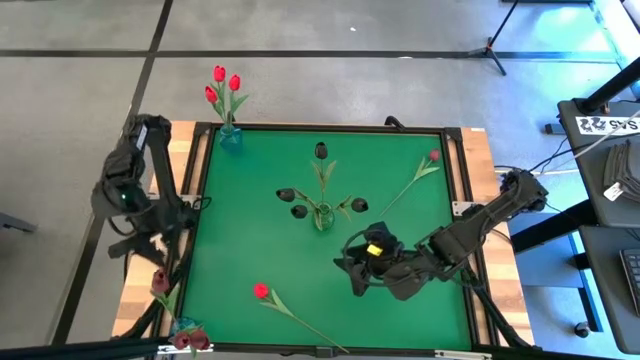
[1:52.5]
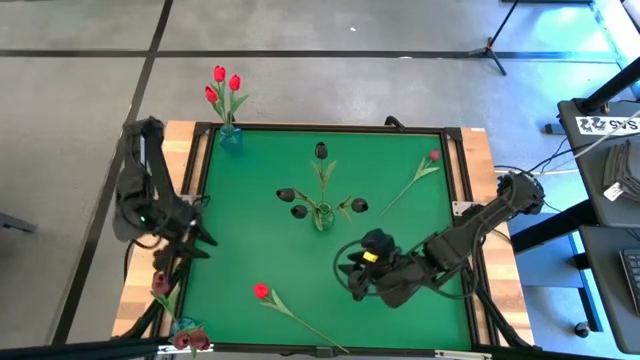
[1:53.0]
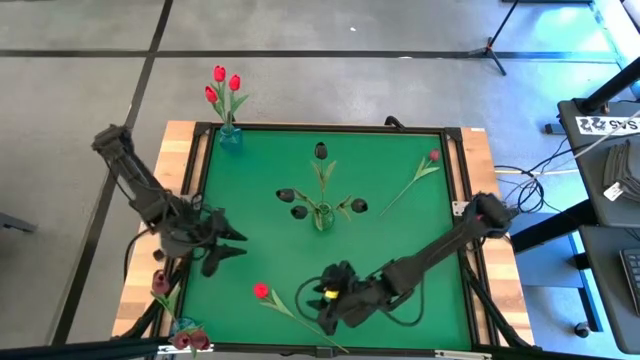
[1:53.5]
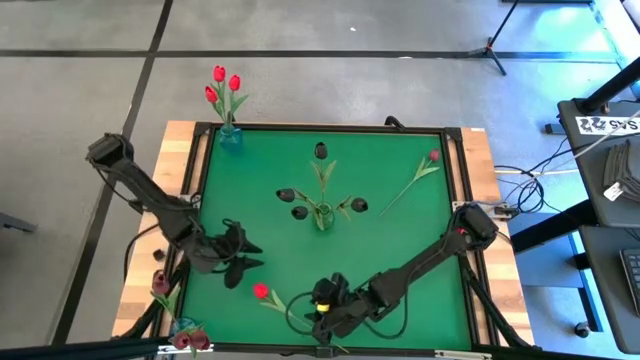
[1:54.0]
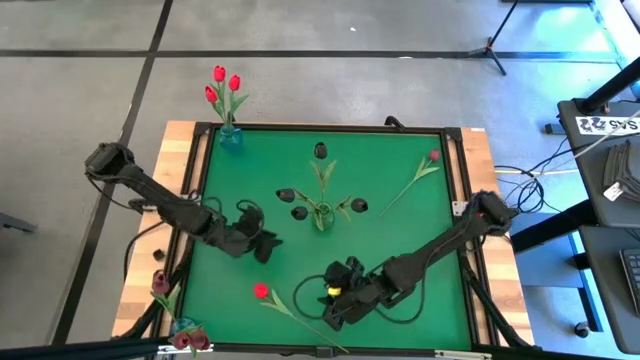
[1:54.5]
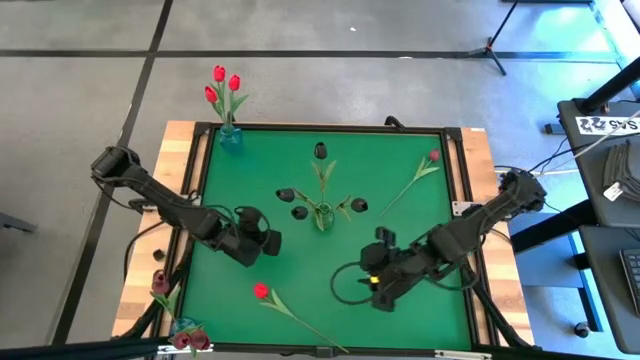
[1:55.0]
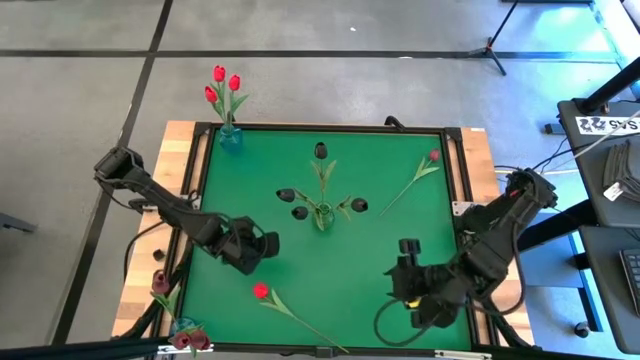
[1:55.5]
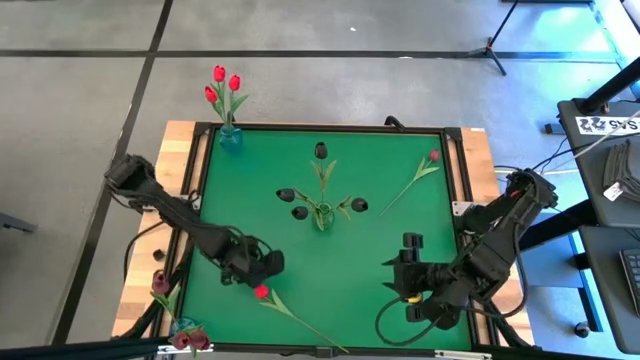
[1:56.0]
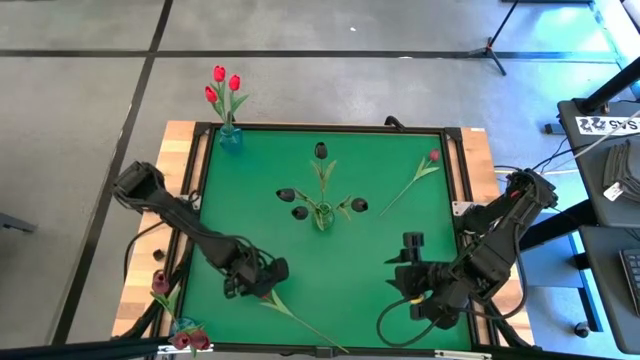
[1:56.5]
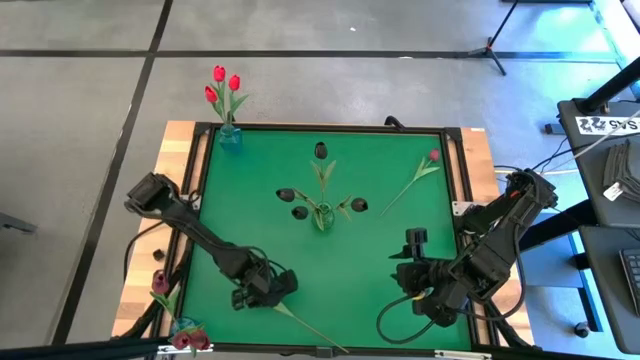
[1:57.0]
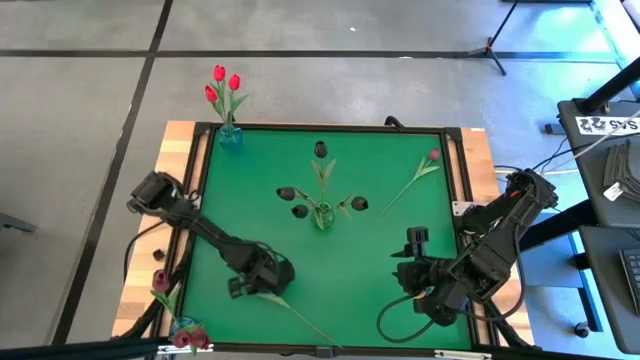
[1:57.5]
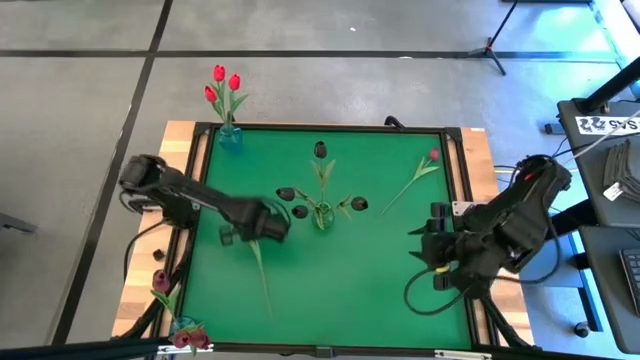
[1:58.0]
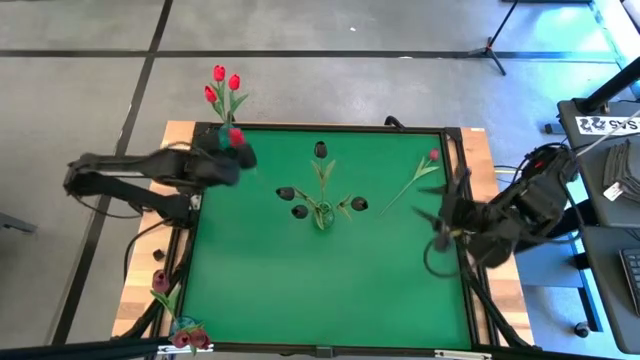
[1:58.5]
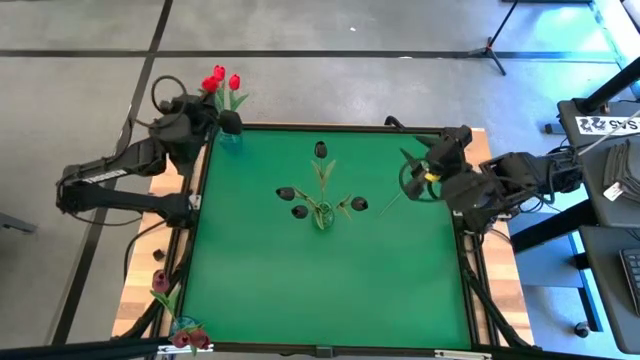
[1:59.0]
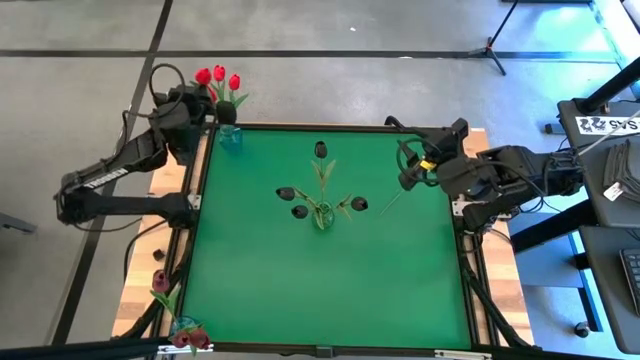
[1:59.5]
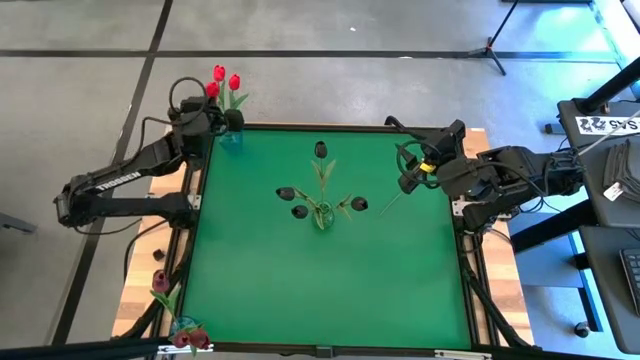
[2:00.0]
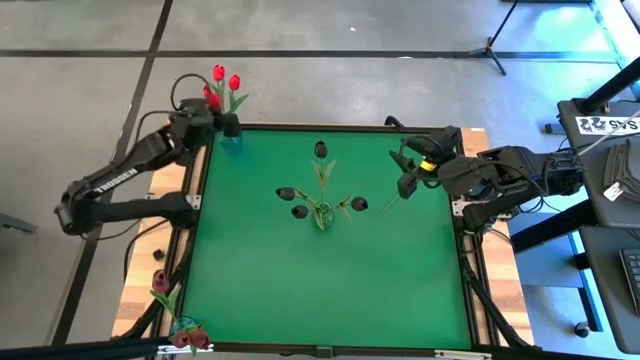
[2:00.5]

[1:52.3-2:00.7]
Task: Sort flowers into vase by color
Put the red tulip into the top blue vase

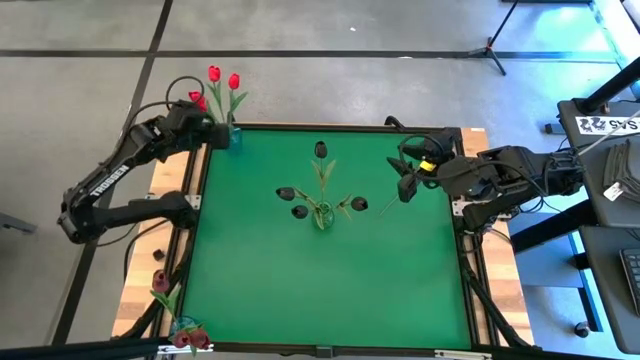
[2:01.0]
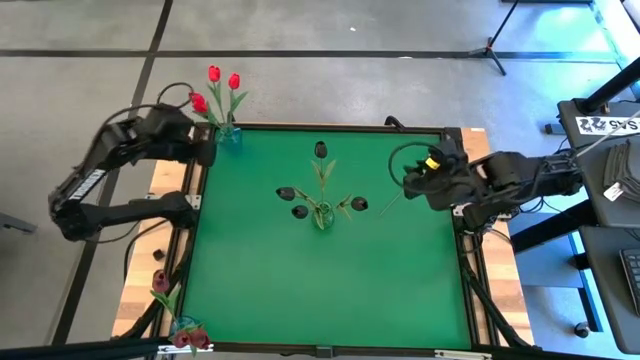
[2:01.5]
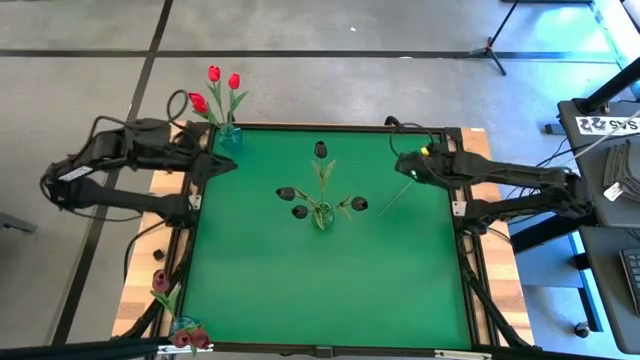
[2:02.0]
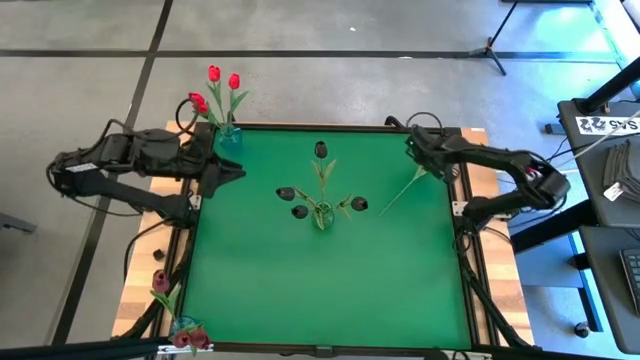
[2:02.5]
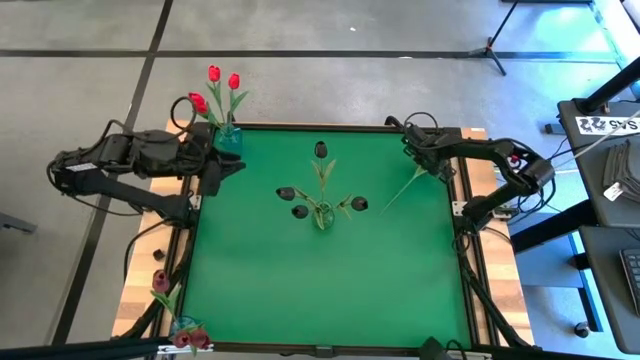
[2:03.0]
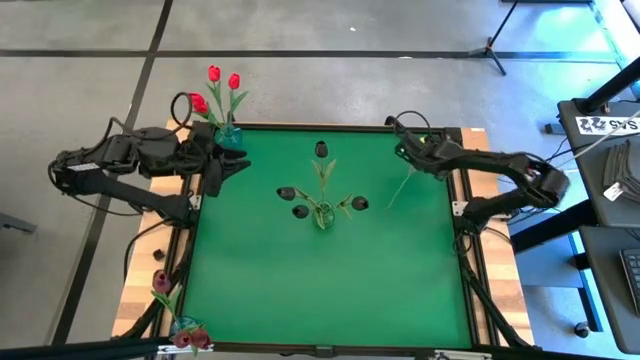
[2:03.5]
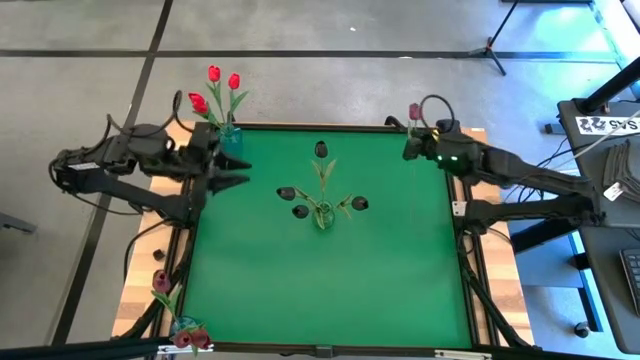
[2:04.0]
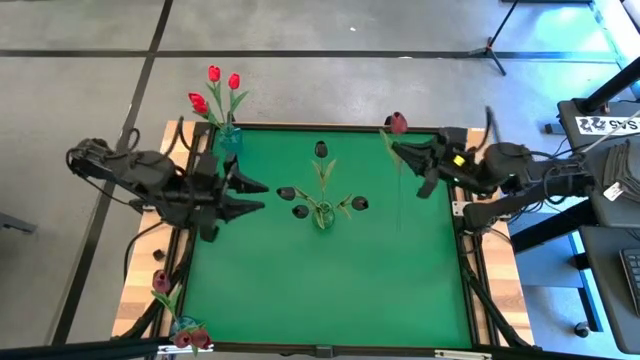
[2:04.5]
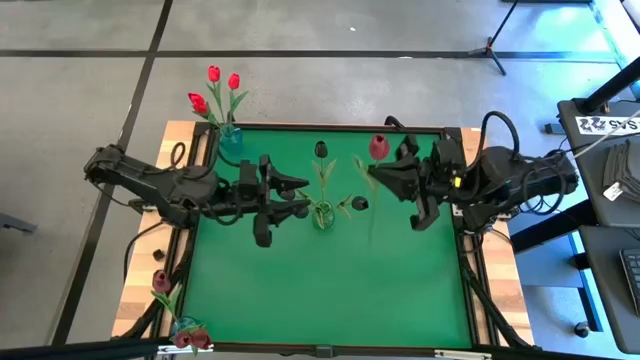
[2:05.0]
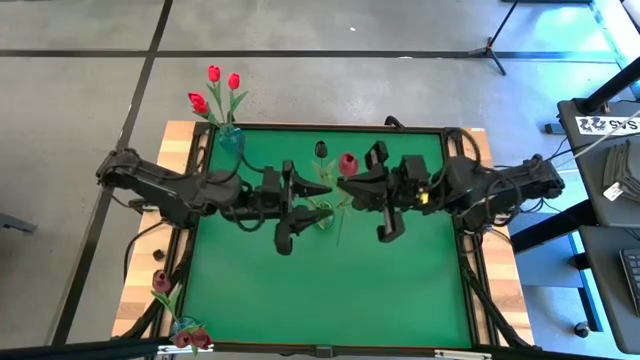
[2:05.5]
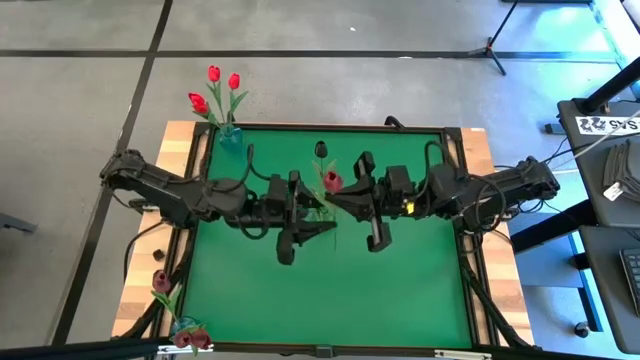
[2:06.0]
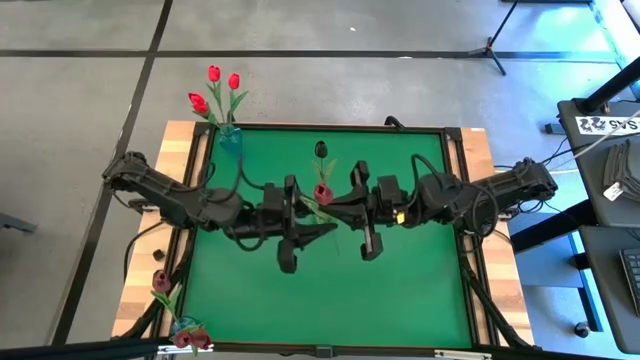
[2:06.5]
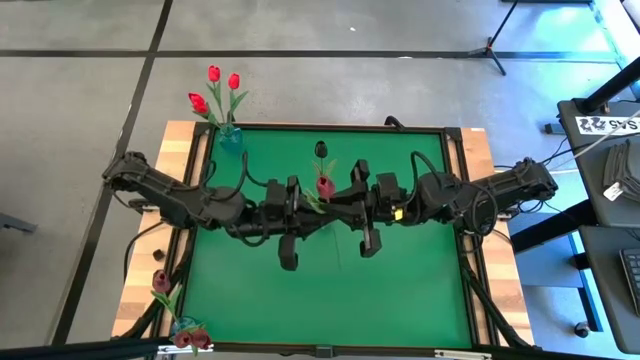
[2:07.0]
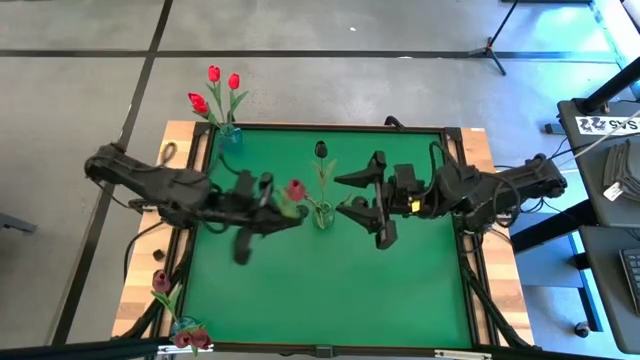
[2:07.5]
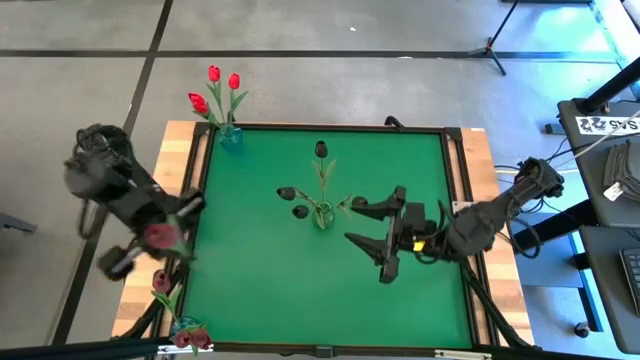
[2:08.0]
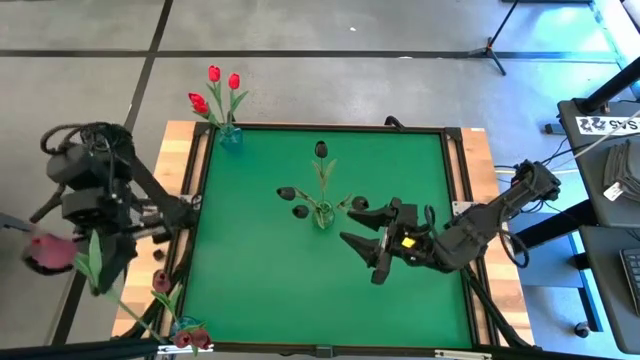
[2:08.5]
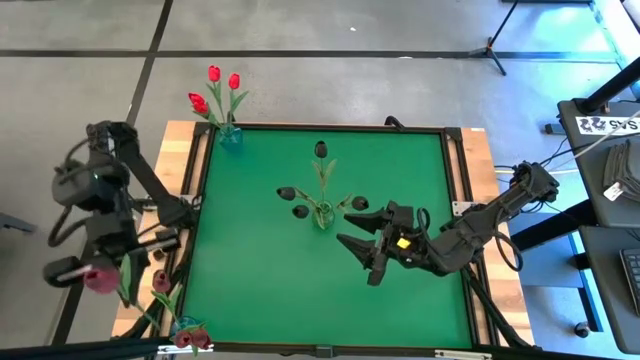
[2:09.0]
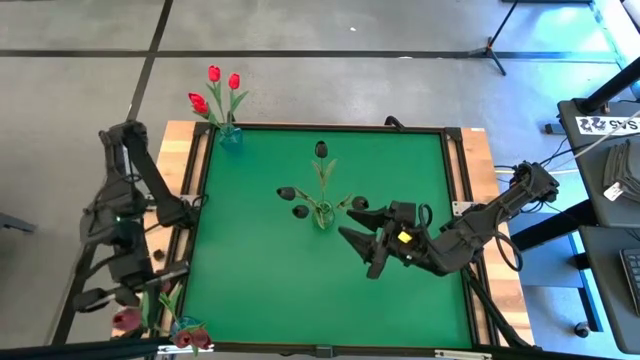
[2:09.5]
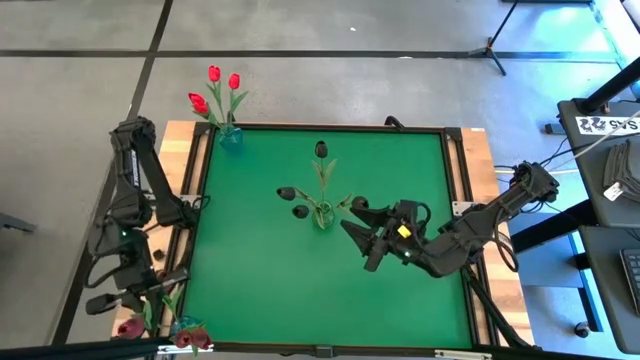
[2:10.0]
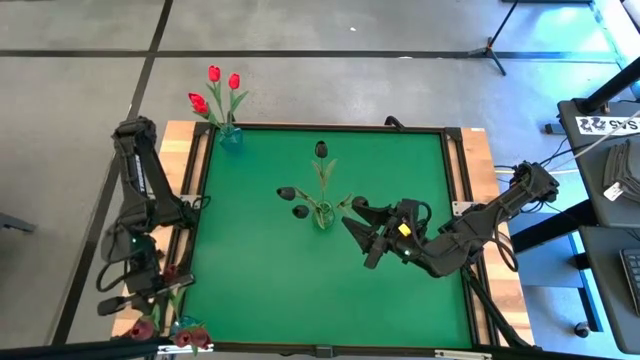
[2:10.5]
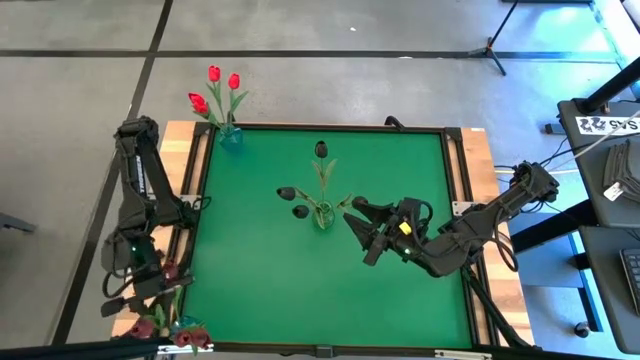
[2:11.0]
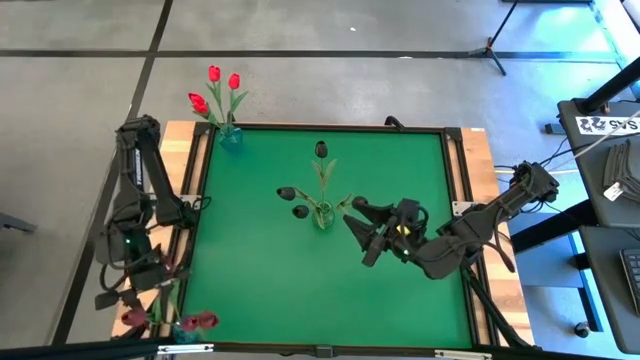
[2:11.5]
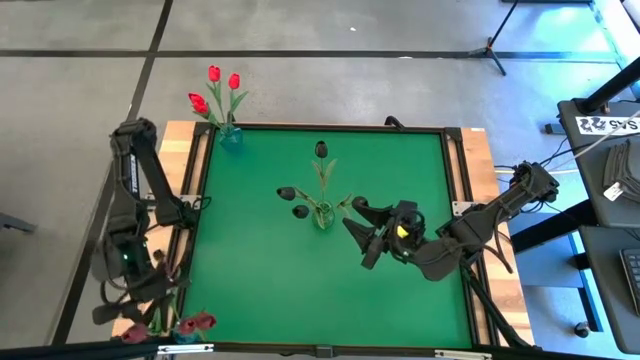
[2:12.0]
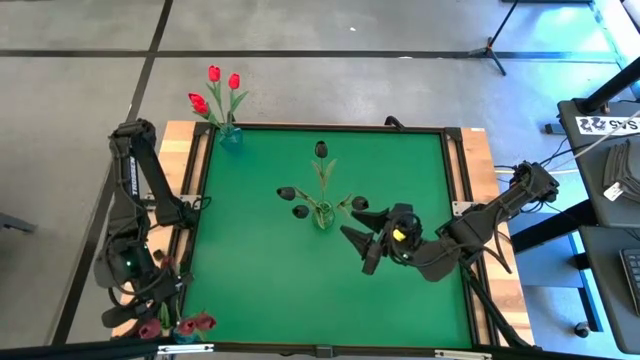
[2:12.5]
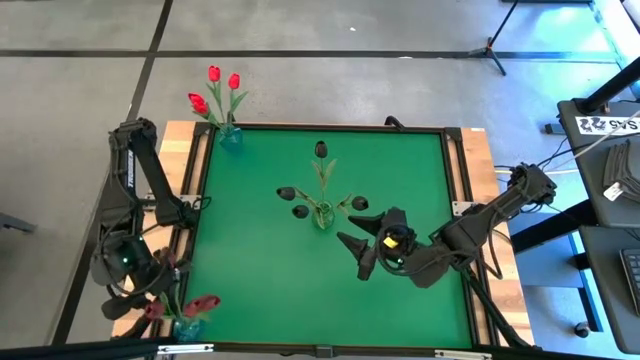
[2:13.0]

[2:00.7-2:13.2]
Put the dark red tulip into the bottom blue vase

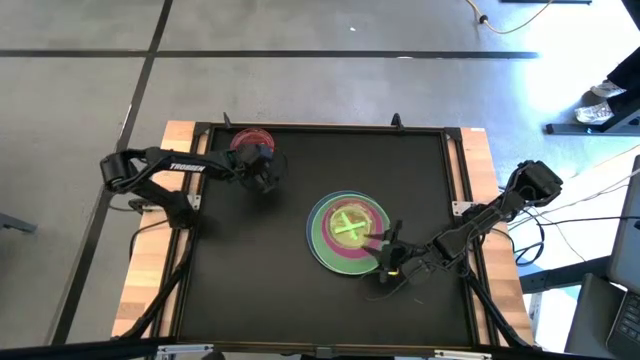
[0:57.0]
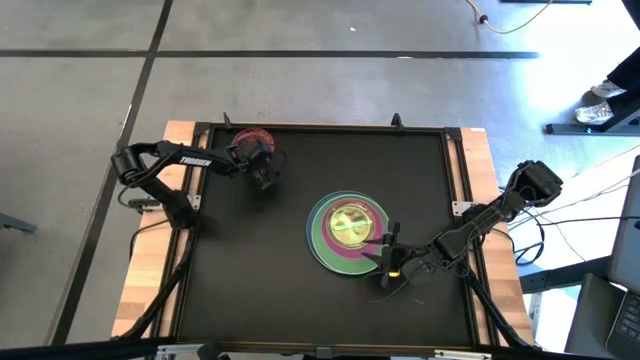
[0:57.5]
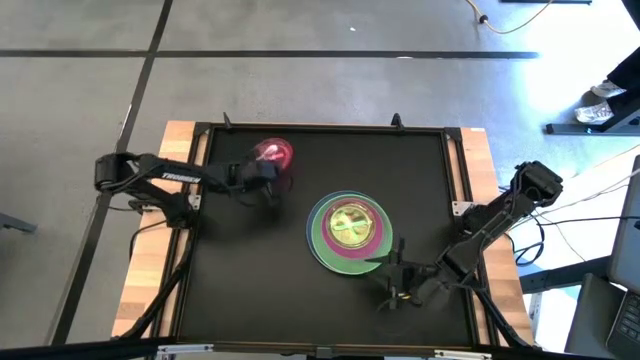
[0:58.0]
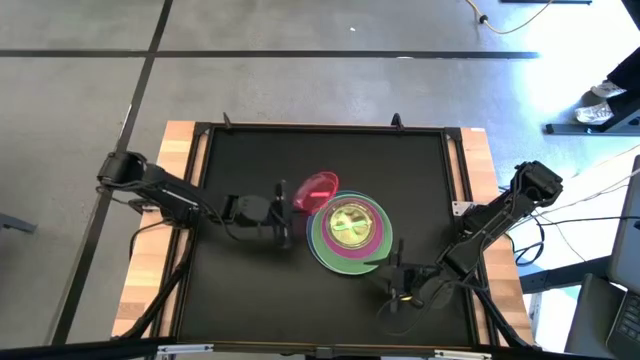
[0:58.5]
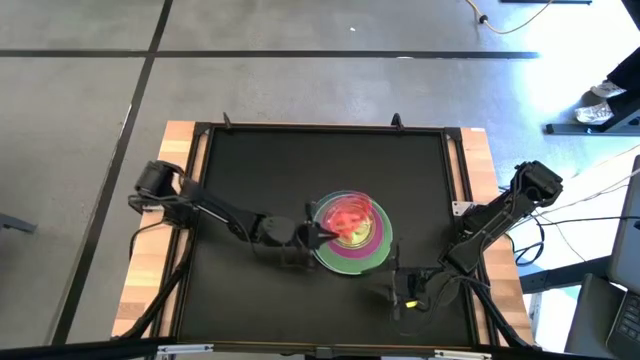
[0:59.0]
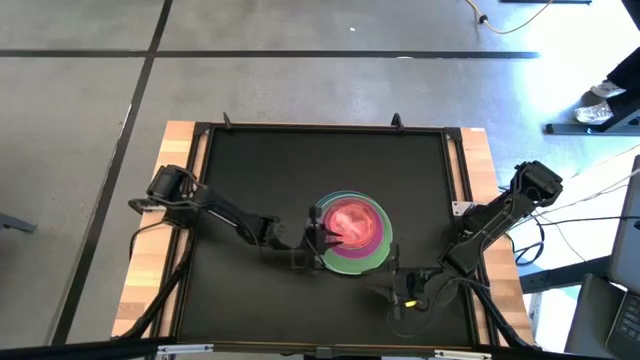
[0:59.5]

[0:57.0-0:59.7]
Task: Stack plastic plates
Stack the red plate on top of the light green plate
